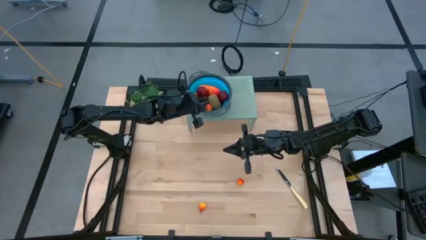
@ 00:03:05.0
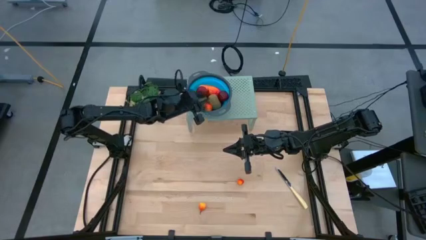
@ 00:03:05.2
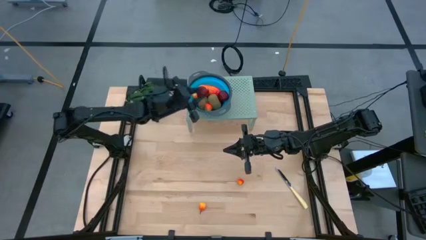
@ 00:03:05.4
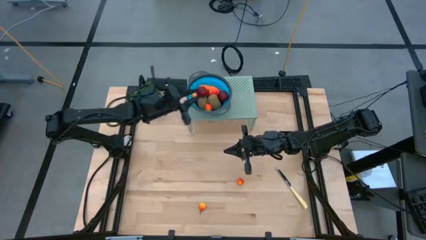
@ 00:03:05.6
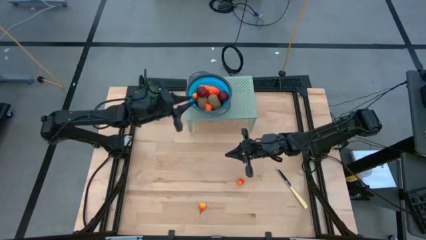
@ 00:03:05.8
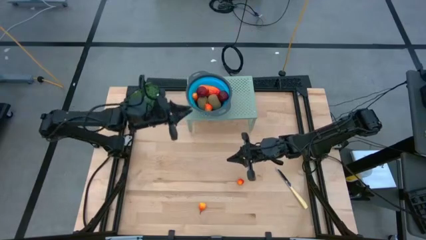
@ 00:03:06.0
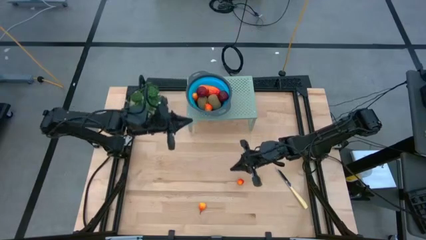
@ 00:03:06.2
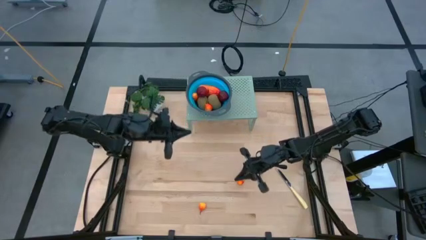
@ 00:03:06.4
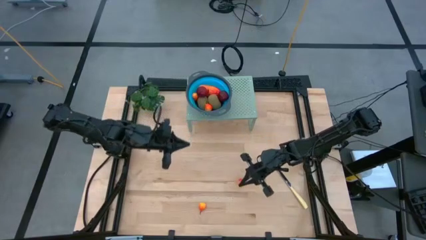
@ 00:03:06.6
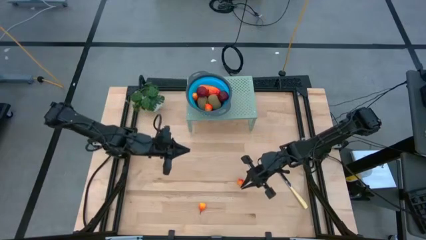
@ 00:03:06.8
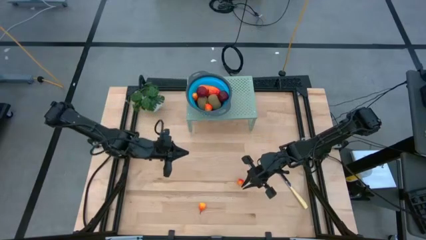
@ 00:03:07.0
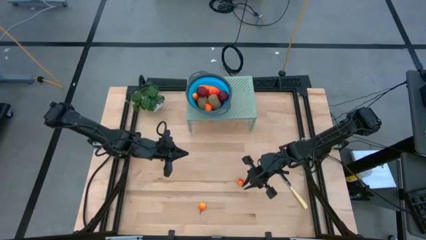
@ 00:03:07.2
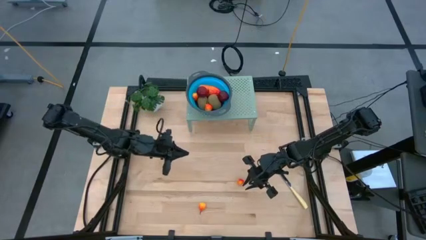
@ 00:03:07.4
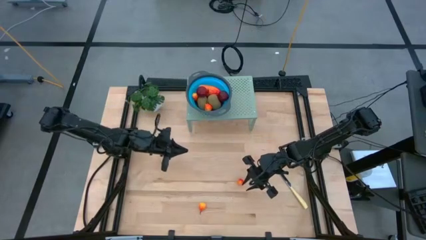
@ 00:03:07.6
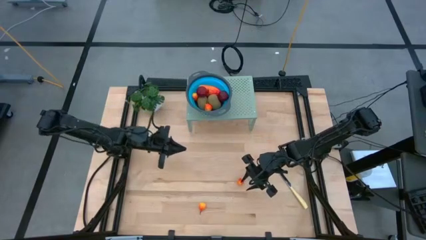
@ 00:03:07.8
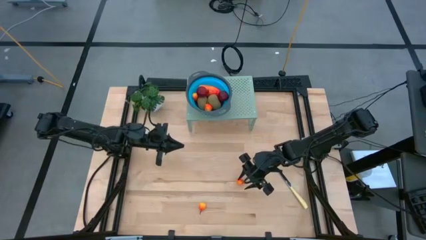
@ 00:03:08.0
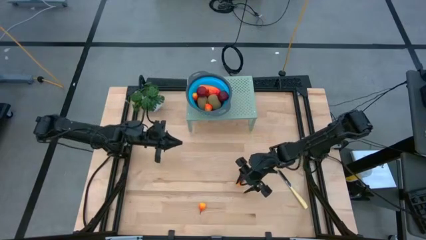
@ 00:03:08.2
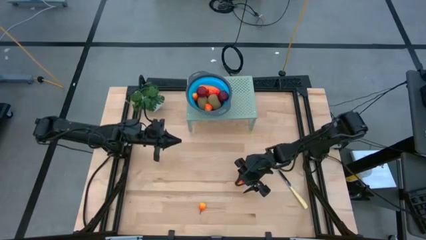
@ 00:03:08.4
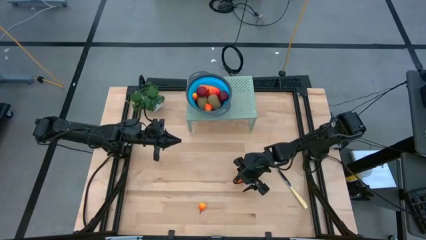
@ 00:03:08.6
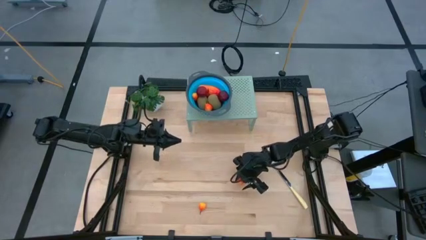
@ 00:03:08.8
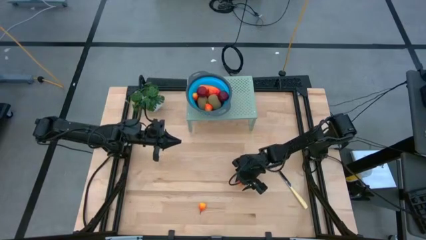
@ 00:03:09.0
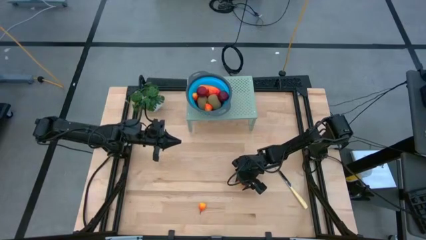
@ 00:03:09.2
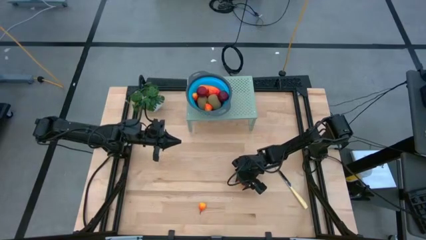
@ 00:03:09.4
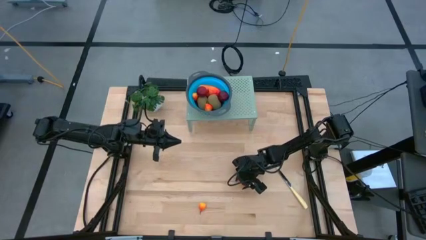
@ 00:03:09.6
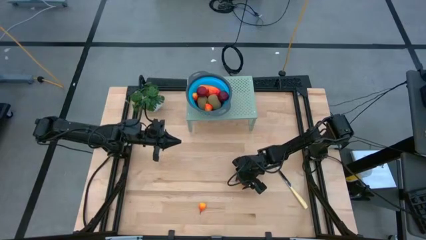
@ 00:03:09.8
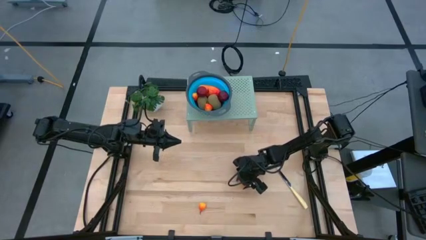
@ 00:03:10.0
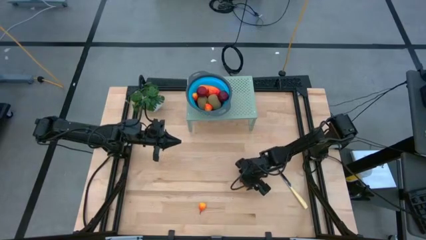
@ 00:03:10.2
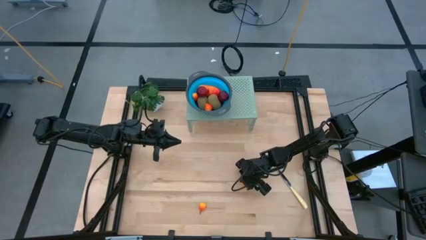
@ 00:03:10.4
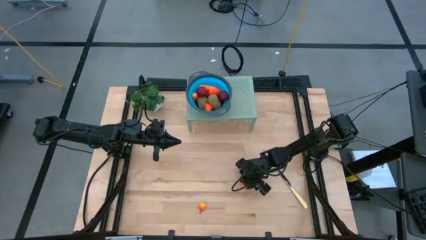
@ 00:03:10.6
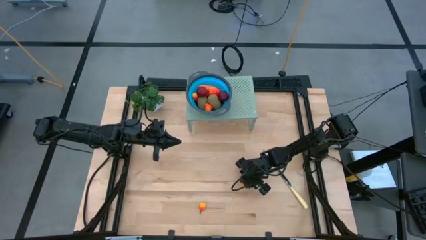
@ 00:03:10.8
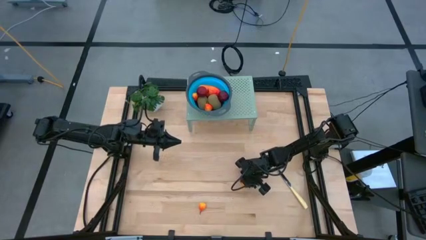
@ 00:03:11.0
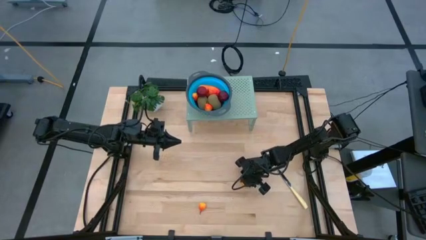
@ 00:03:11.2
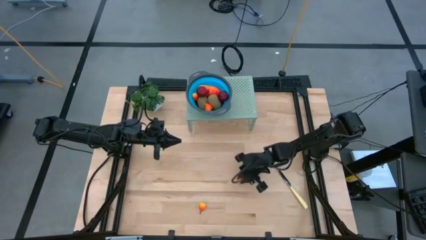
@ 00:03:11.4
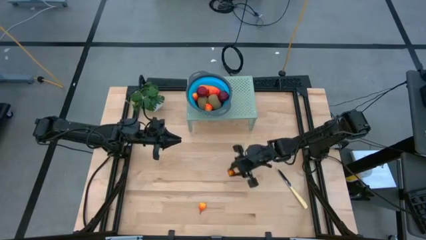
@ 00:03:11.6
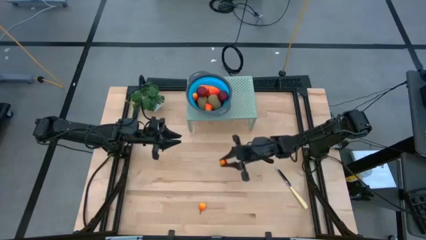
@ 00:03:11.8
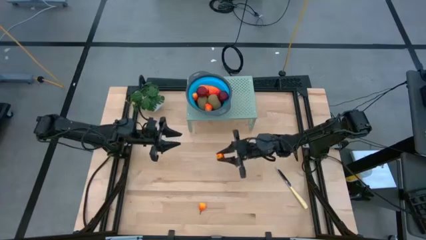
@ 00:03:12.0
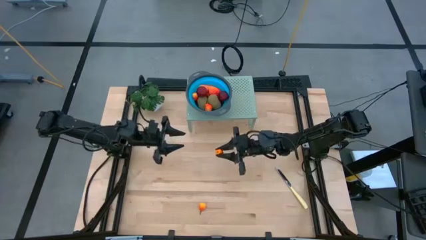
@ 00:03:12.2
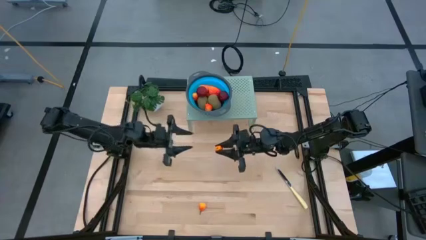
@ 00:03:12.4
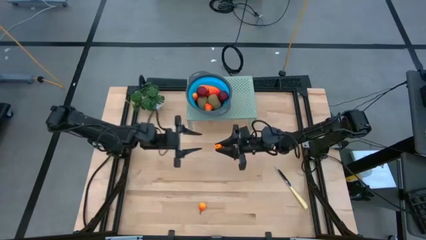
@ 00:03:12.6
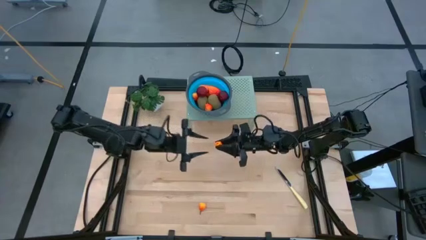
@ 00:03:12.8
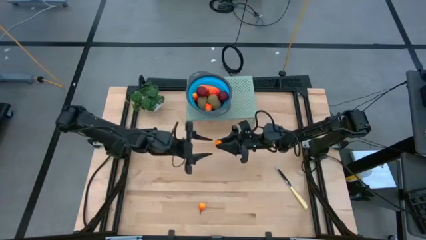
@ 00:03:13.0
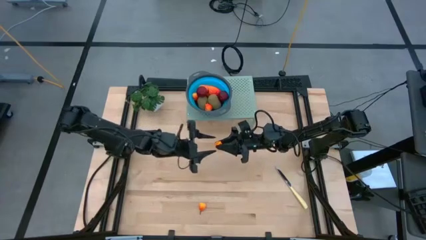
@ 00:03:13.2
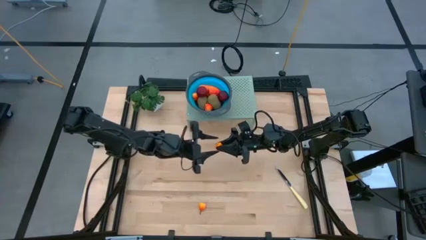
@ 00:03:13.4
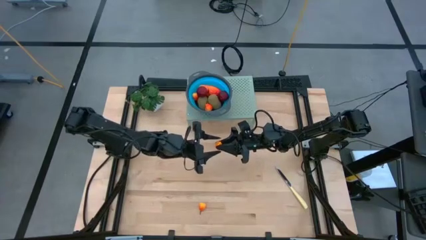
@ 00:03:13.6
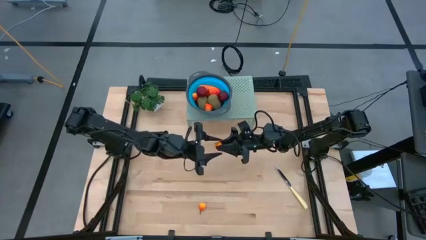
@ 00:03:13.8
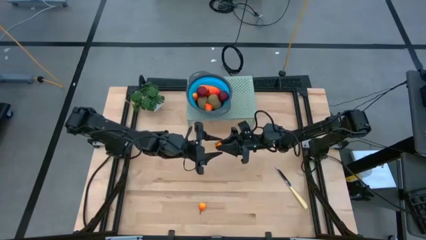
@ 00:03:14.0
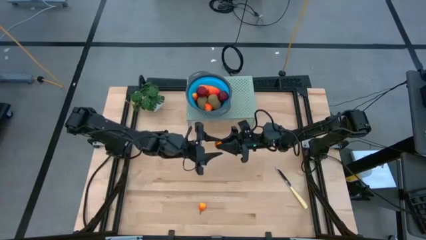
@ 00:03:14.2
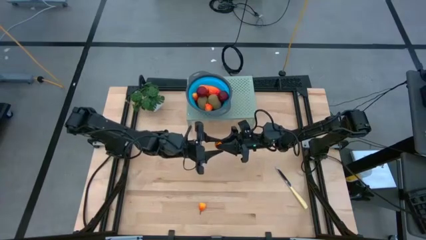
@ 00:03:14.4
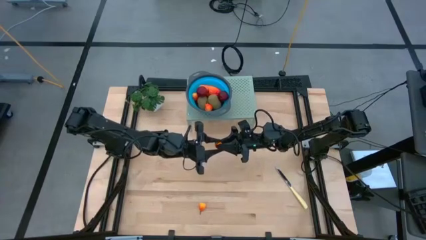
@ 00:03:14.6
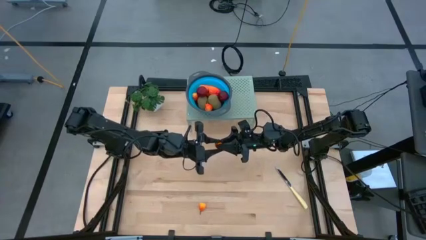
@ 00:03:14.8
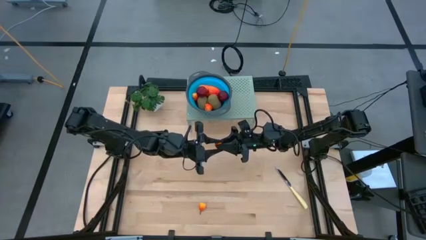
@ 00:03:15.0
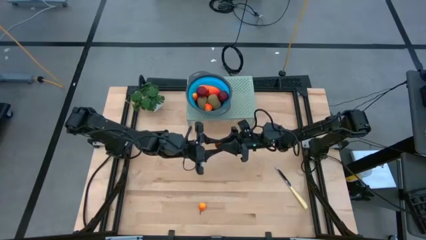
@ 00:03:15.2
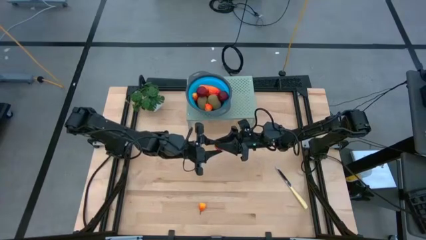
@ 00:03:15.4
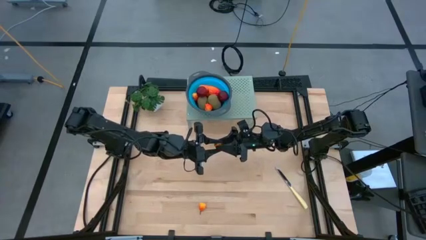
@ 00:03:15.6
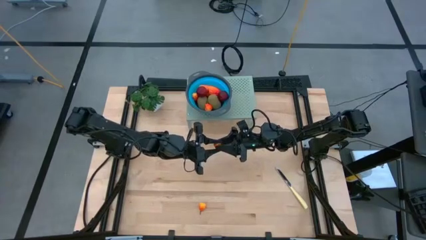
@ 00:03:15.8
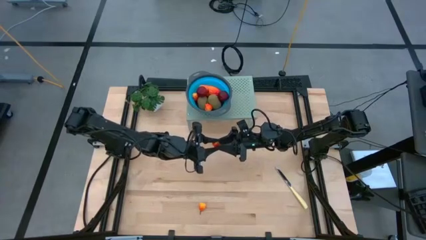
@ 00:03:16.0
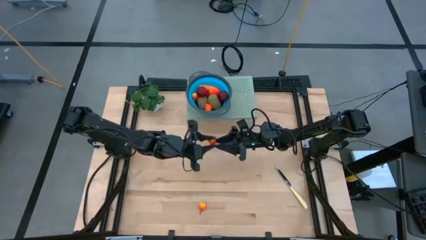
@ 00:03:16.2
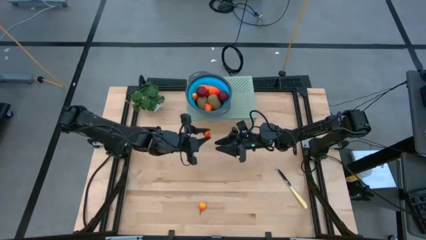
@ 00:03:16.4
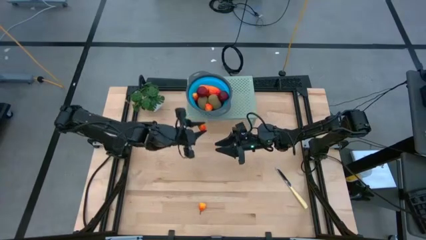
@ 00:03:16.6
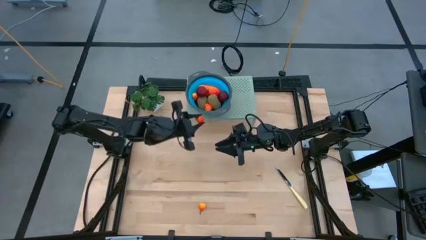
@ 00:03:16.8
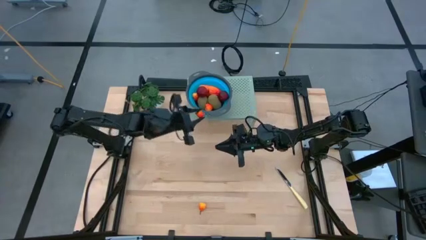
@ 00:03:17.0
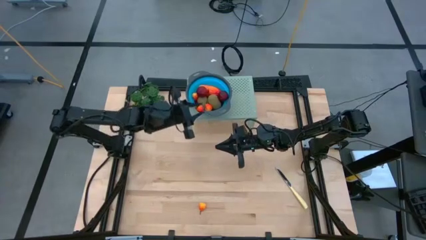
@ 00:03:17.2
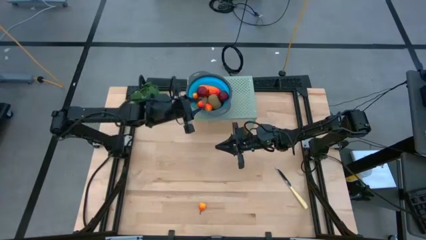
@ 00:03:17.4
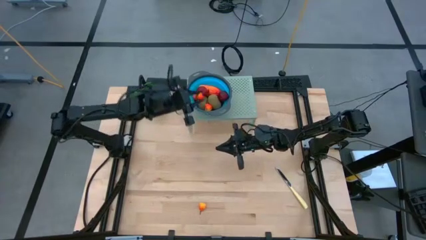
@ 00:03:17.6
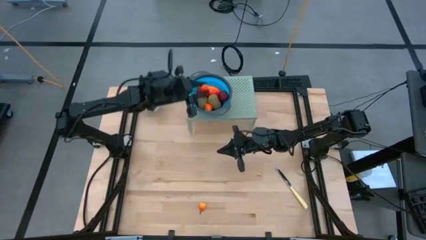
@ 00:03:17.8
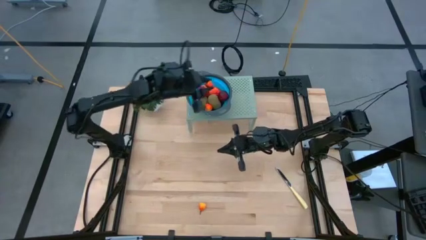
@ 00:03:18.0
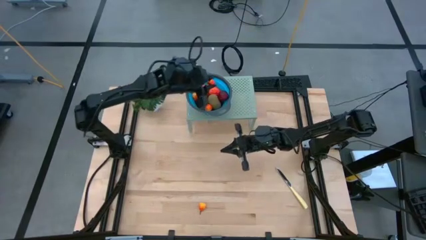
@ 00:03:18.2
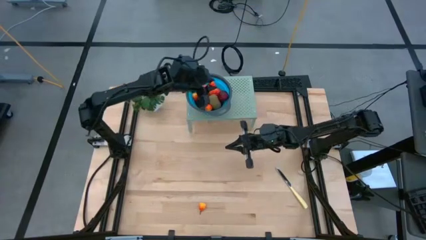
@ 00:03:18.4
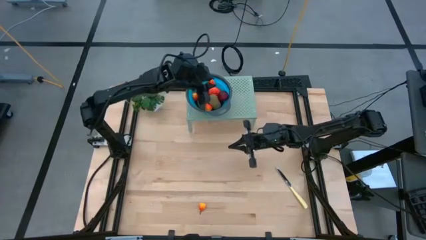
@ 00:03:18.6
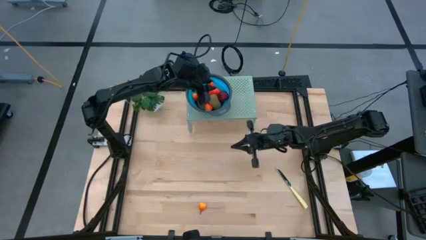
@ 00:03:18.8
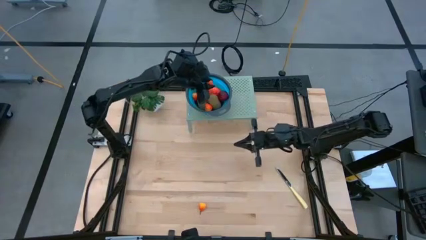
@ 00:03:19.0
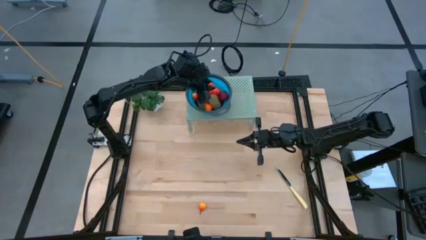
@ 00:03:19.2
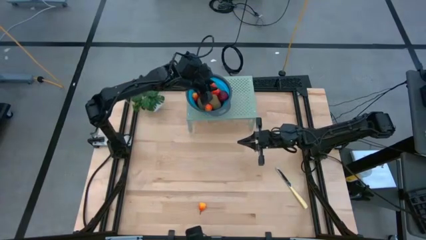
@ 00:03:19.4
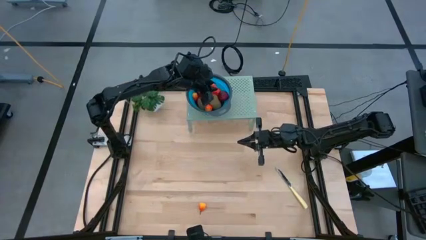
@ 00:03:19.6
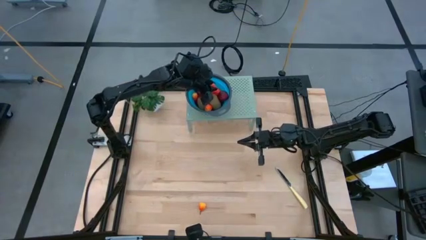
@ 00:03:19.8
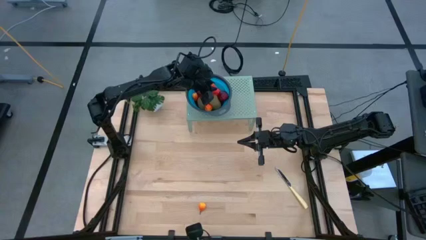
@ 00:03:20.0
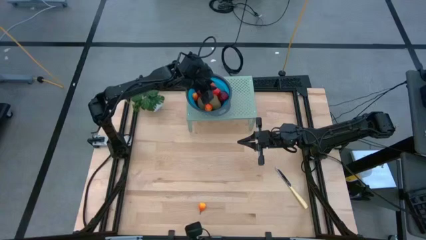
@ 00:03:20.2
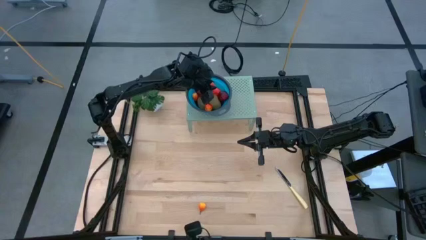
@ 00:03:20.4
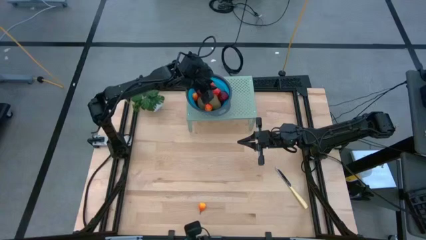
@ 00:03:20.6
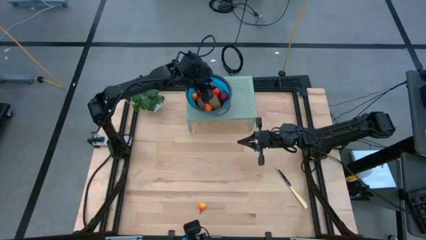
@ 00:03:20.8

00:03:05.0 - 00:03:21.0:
Task: Pick & Place Fruit
Put the orange peach into the blue bowl on the shelf

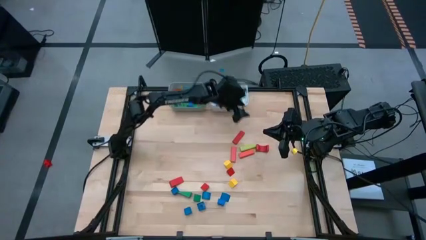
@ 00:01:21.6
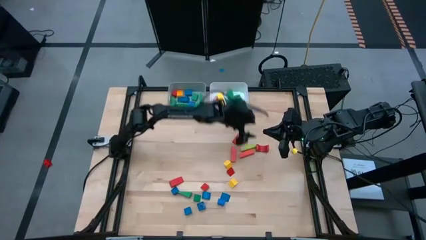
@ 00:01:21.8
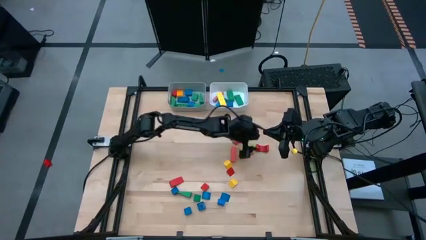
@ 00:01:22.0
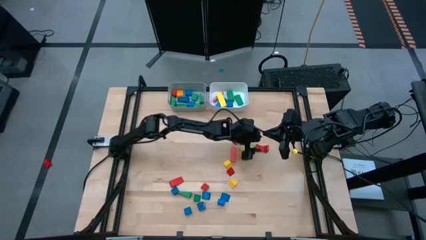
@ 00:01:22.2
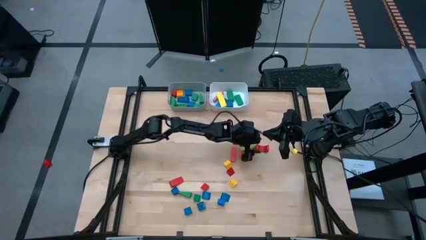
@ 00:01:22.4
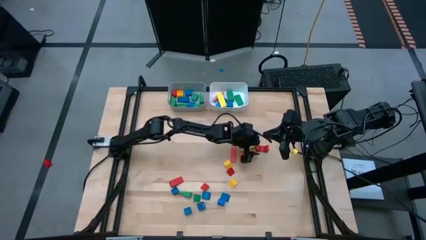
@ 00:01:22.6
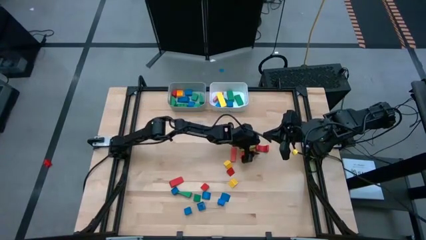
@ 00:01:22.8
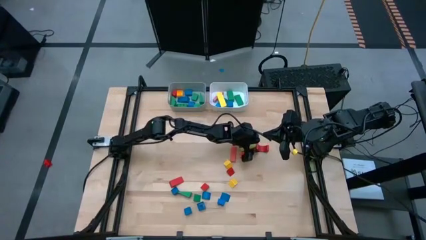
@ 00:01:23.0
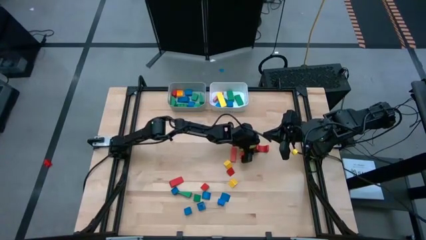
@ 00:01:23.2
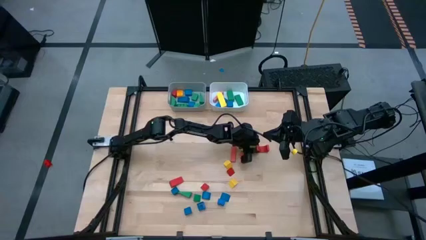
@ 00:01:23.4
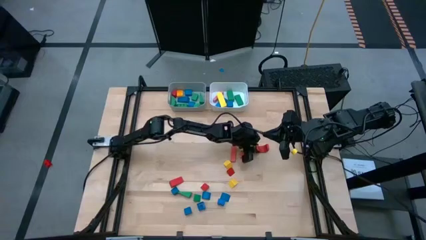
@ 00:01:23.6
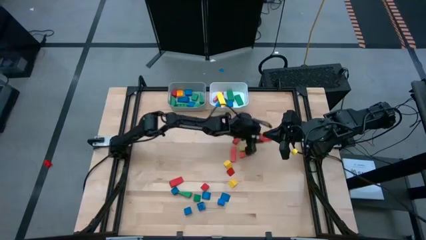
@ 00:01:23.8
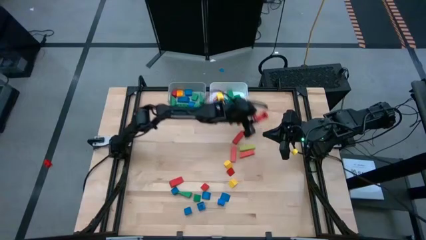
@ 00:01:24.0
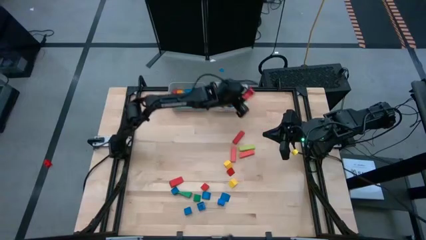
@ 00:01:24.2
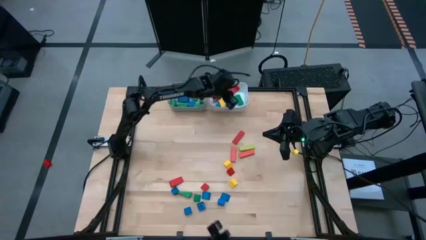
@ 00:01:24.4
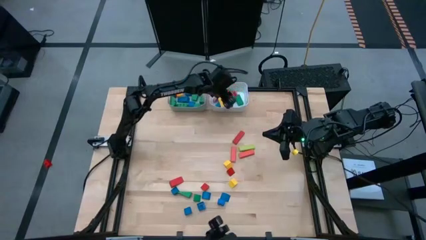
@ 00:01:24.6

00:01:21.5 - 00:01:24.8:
Task: Sort blocks by size
Put the red arch block into the white bin
